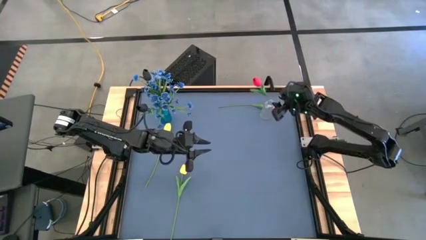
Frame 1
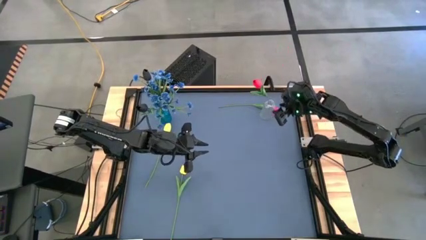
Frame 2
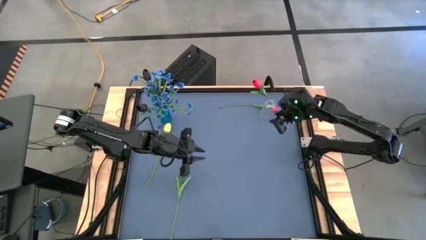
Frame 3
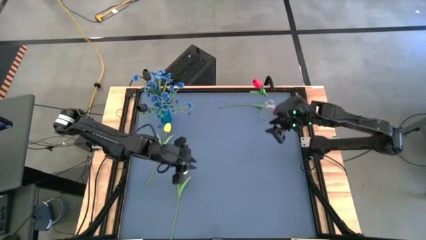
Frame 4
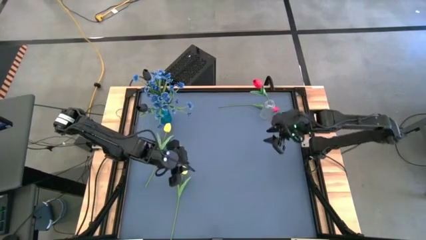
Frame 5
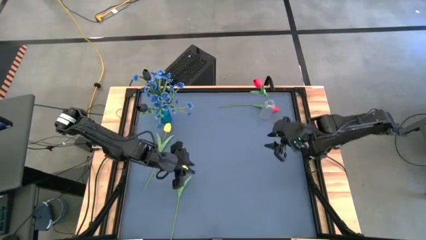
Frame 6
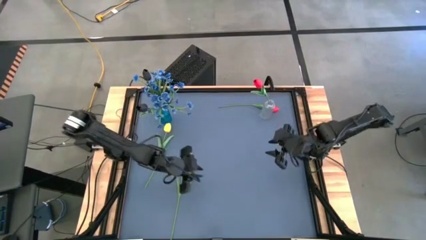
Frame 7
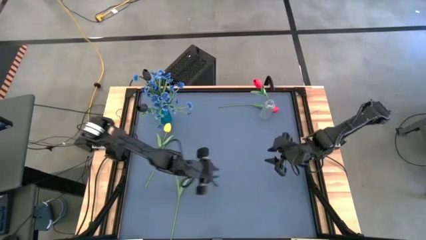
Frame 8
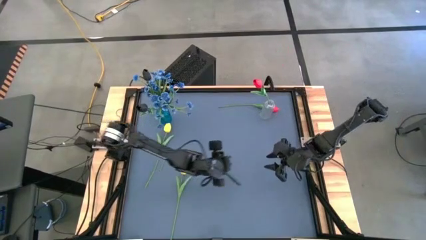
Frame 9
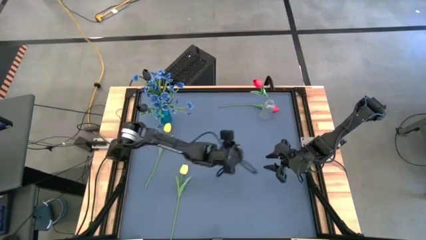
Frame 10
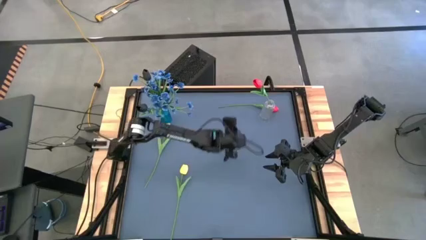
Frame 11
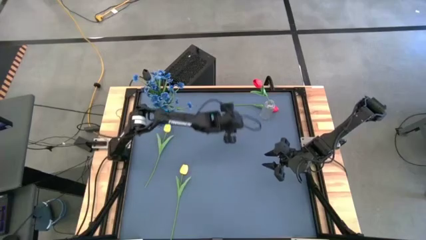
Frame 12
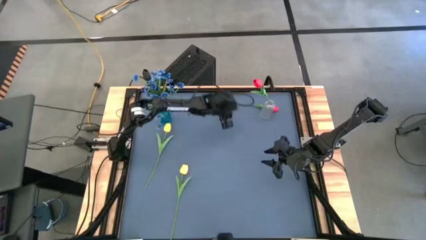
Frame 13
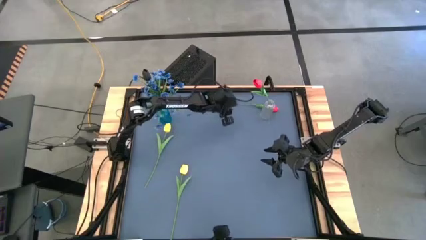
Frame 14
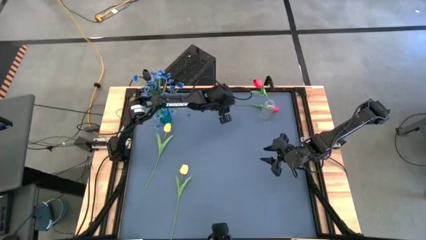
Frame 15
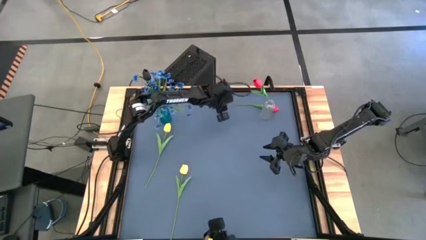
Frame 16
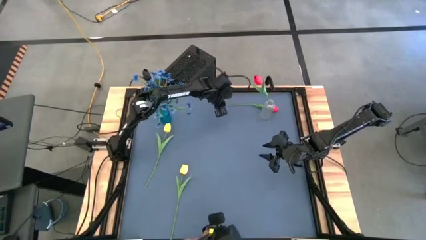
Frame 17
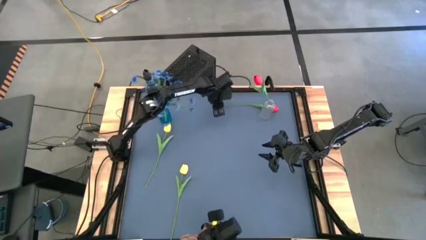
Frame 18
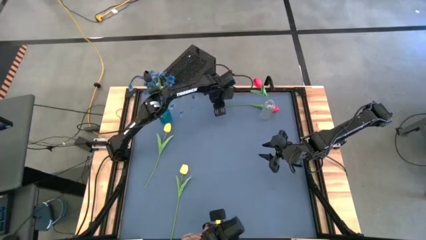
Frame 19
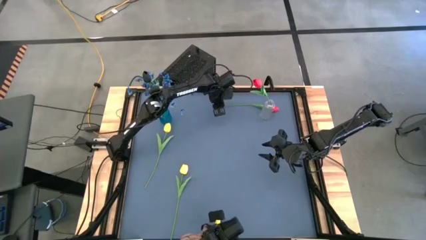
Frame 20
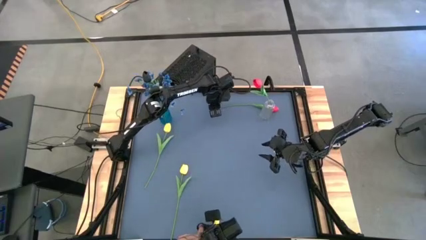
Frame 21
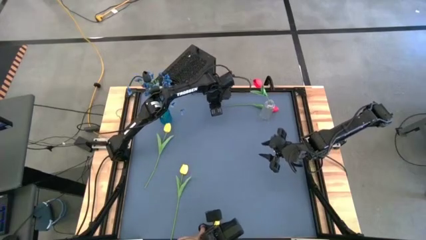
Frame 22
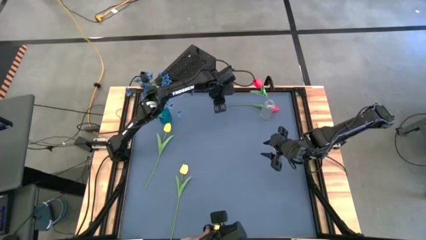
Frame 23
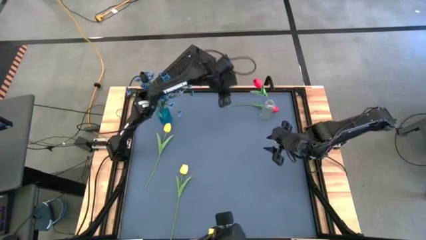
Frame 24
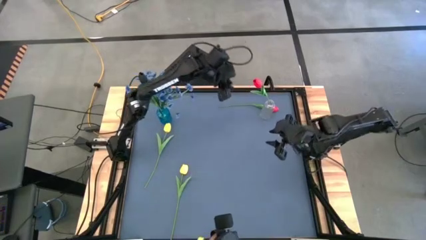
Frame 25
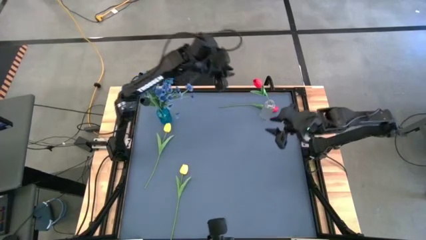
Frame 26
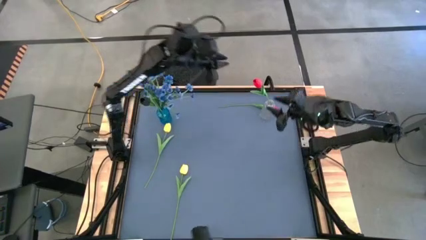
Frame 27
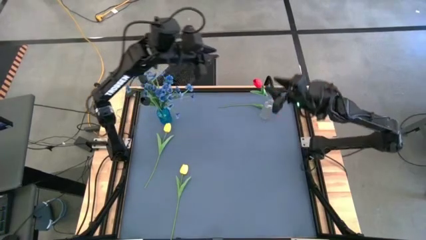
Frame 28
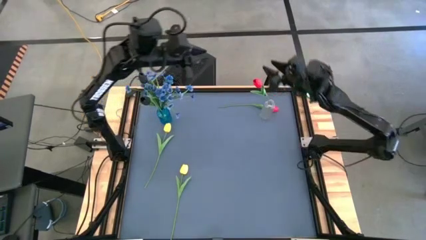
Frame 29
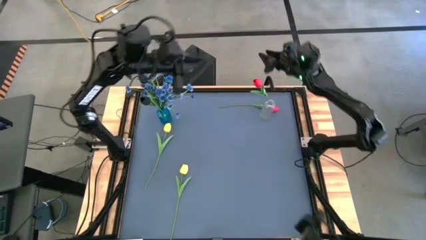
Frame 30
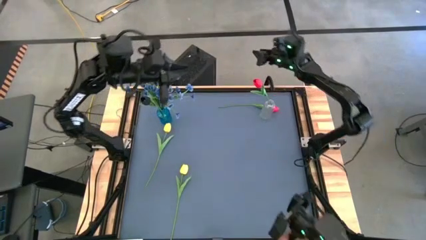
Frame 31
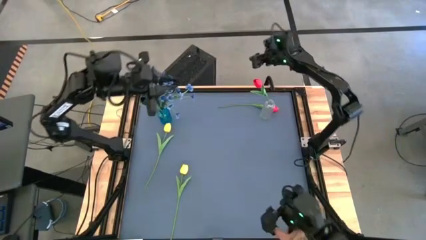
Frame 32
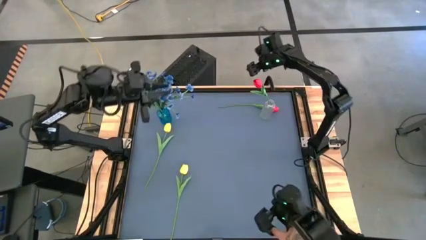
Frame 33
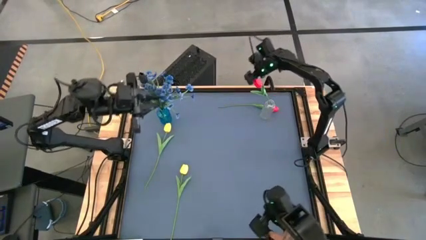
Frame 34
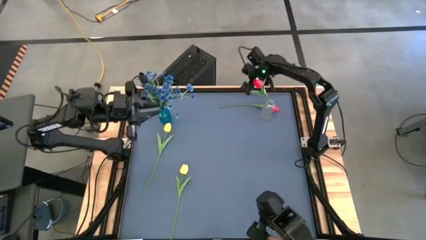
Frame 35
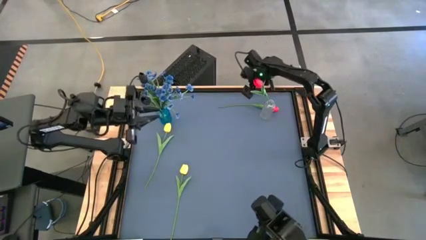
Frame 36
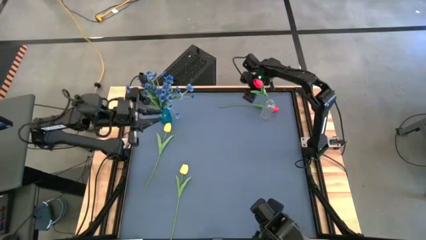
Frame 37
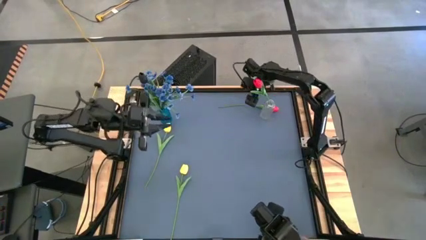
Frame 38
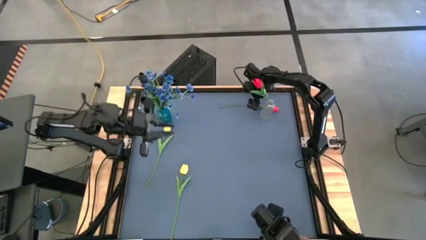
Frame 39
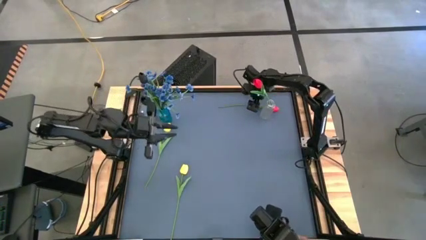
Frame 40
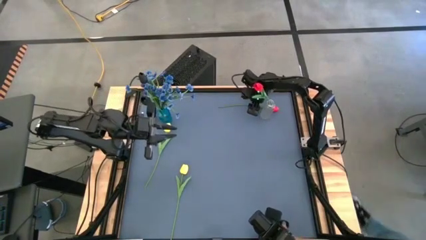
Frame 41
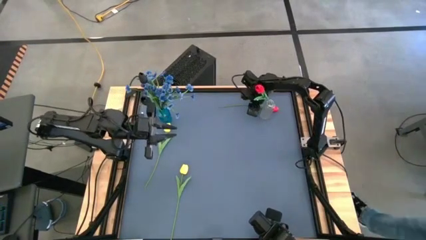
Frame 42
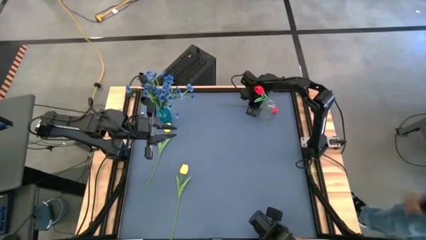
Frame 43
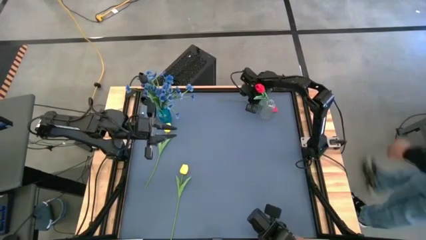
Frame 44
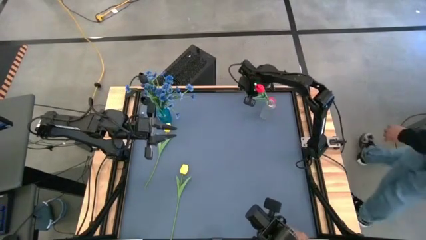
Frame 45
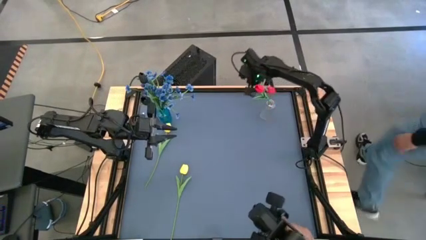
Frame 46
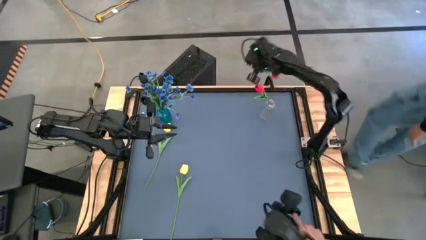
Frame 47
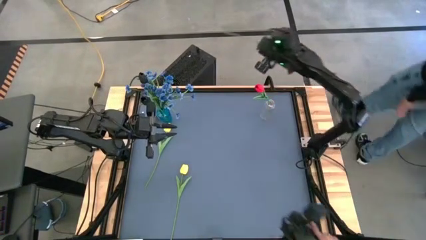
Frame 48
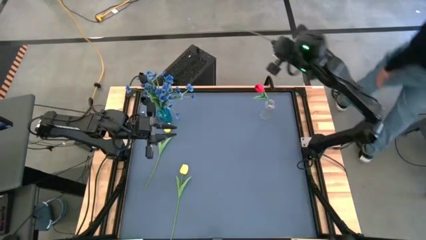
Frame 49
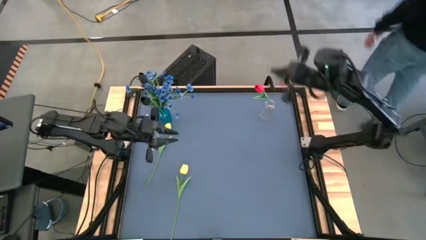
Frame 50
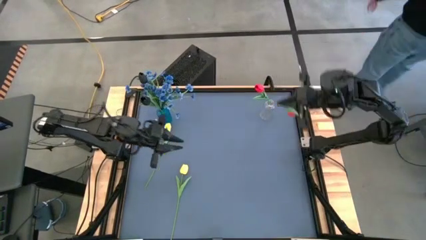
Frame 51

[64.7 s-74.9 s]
Task: Sort flowers into vase by color
Put the red tulip into the transparent vase

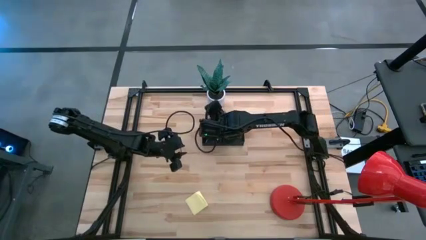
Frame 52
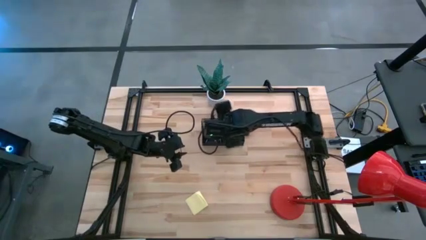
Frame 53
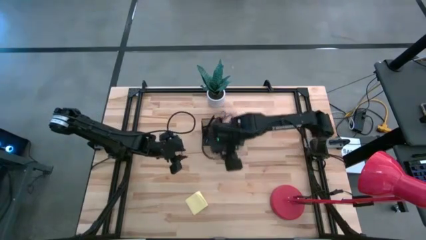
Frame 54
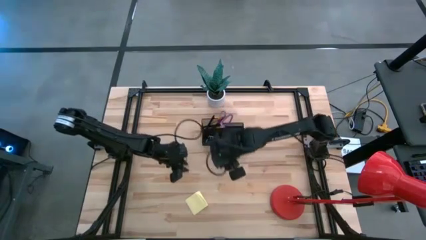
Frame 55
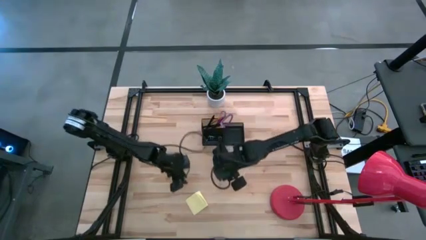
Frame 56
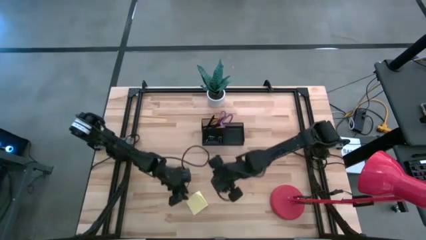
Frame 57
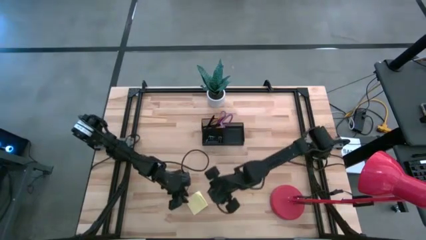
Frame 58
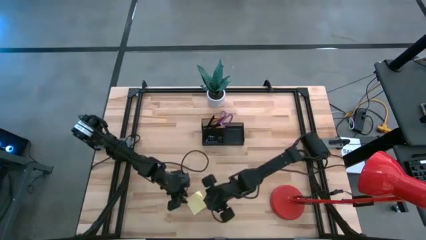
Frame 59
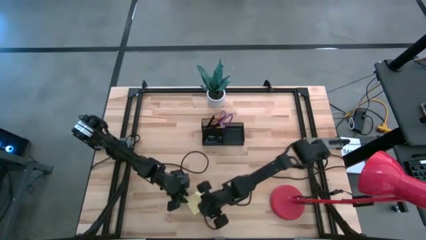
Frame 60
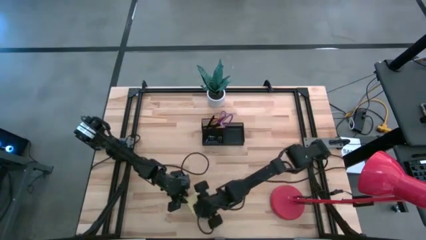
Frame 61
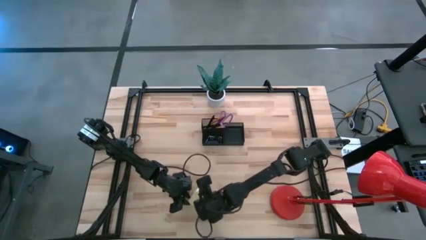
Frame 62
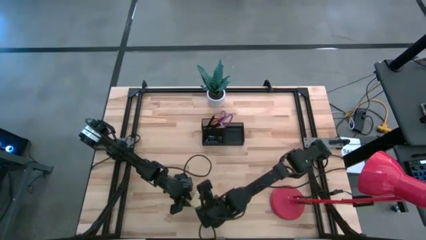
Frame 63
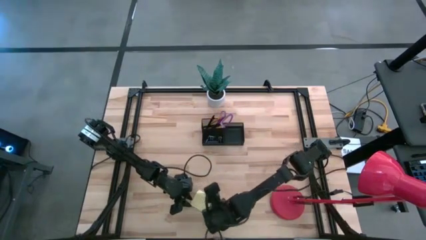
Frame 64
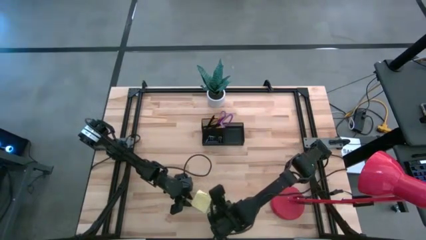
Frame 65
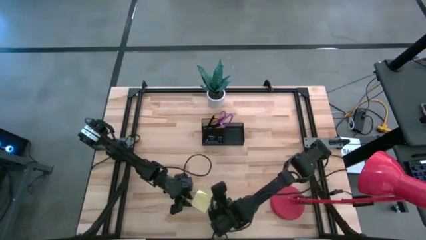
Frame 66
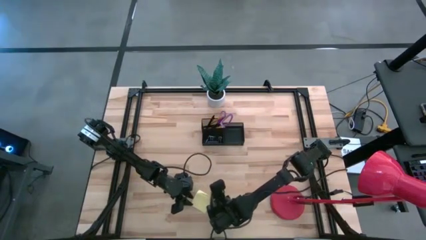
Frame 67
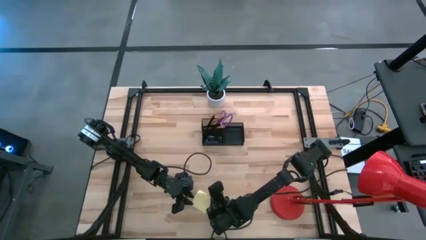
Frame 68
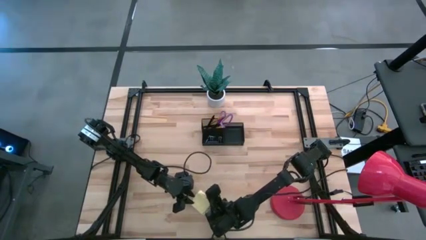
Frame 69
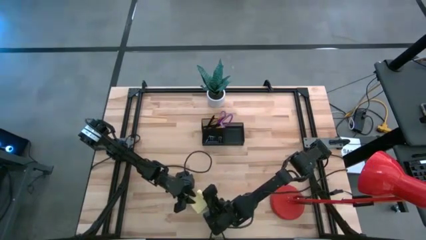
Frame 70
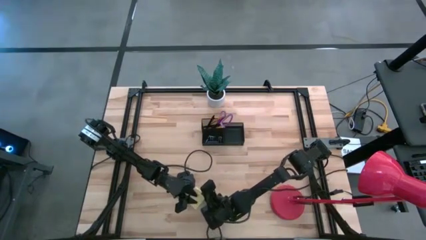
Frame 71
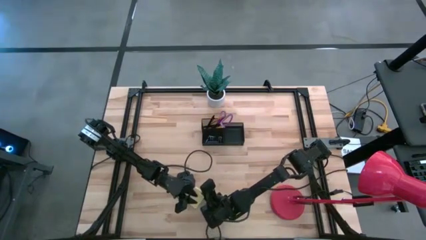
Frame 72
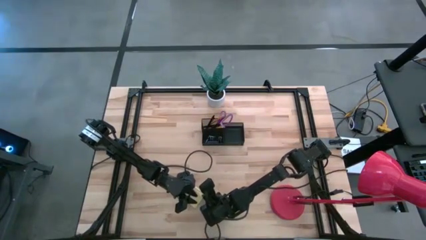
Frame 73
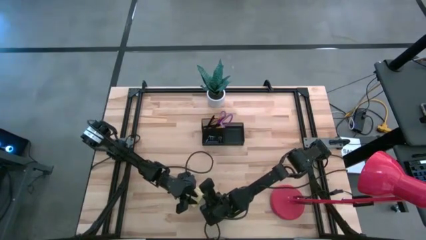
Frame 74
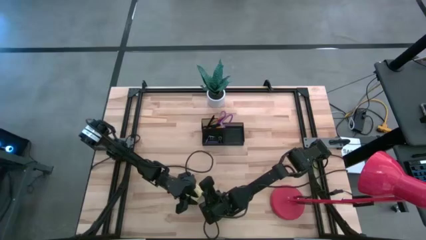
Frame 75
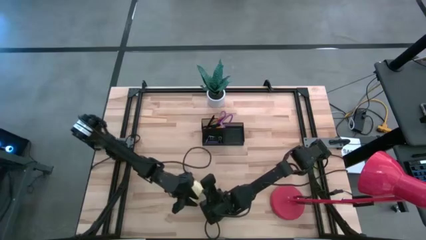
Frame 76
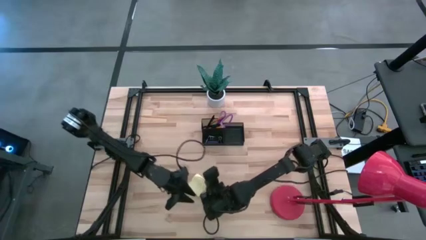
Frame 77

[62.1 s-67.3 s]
Task: Pick and place office supplies into organizer
Put the yellow note into the black organizer

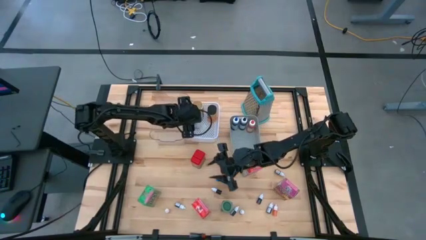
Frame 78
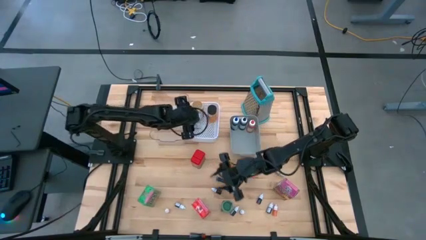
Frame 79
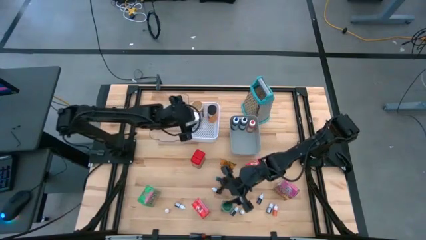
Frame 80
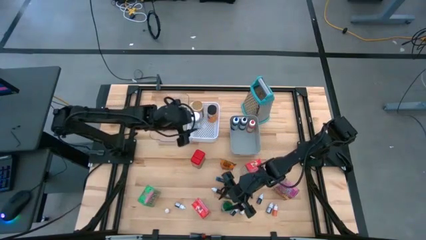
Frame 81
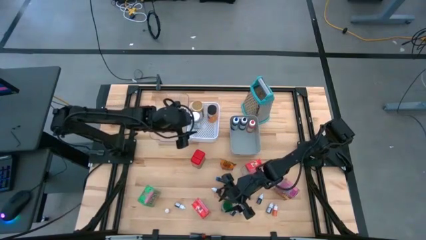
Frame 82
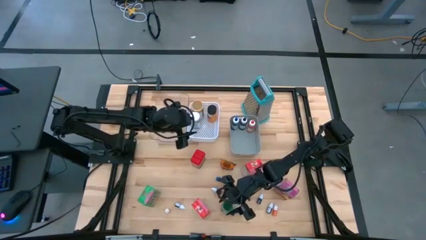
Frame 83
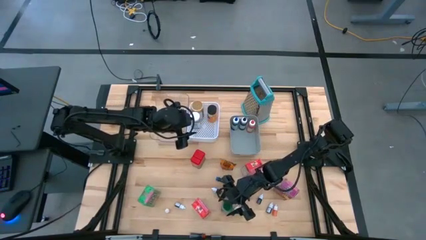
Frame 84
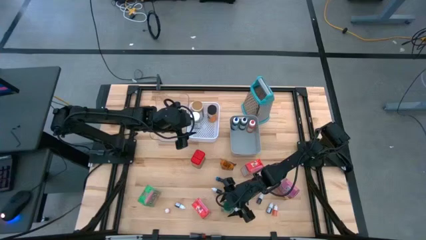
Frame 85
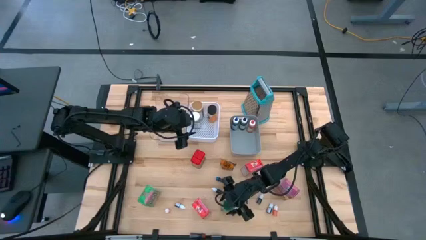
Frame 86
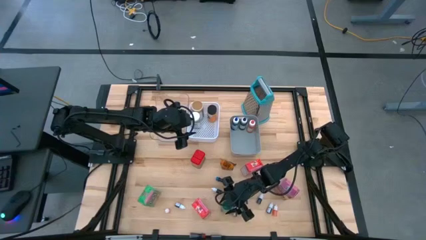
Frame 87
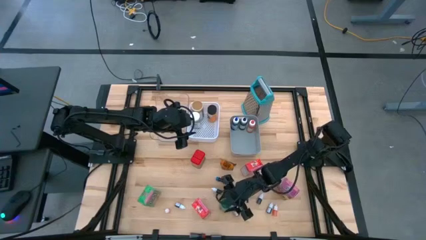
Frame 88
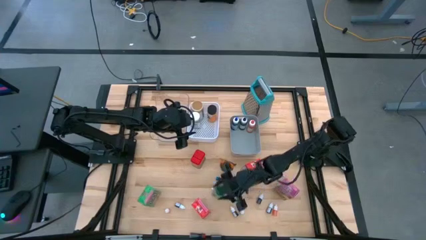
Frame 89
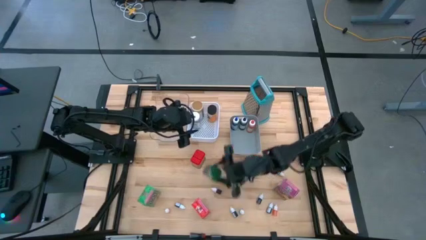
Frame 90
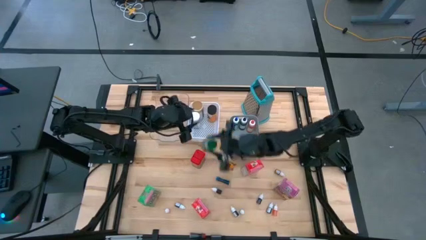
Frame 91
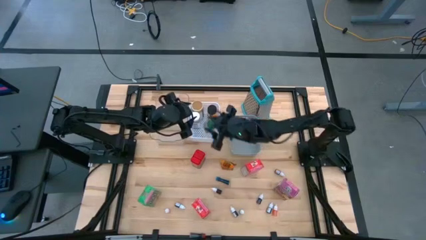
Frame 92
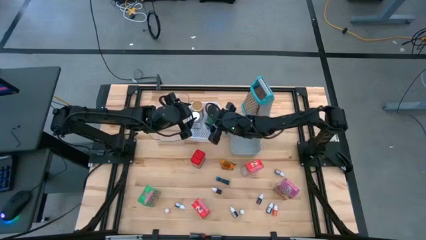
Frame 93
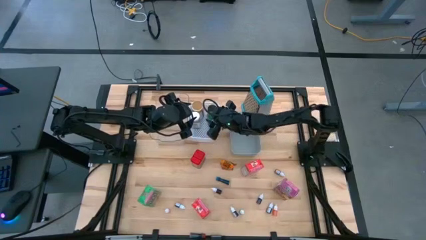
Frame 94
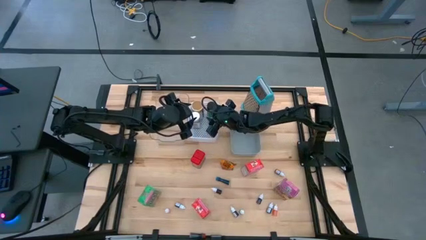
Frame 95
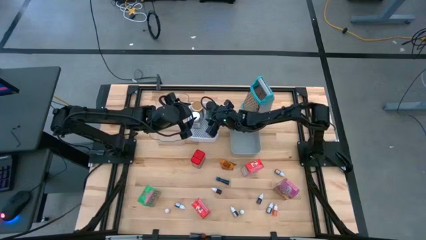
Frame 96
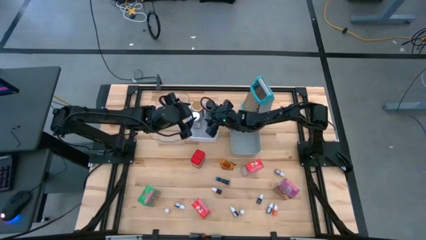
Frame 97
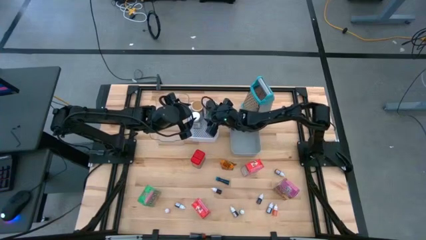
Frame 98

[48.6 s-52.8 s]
Task: Pick & Place Kitchen Items
Put the green spice bottle into the white basket
